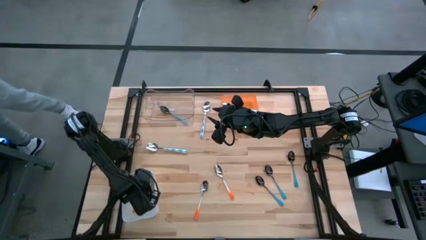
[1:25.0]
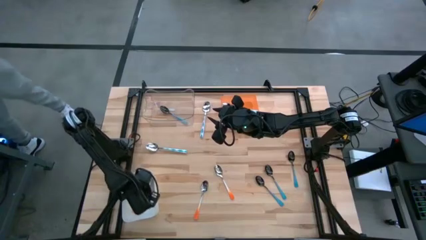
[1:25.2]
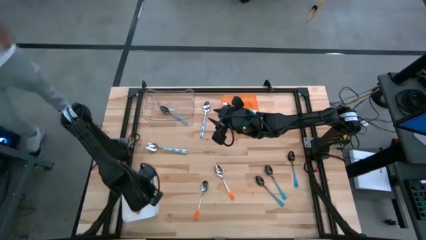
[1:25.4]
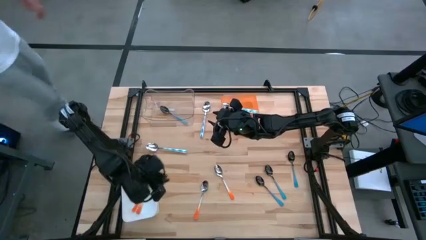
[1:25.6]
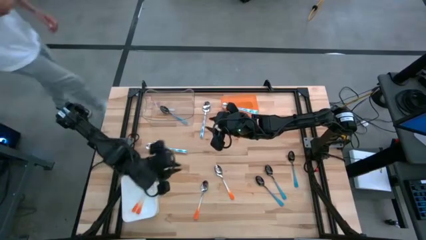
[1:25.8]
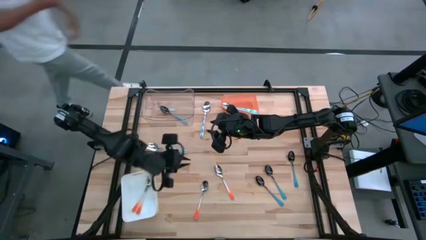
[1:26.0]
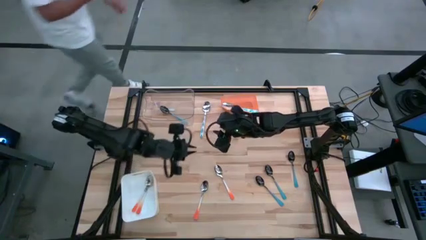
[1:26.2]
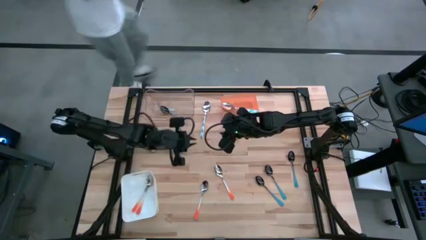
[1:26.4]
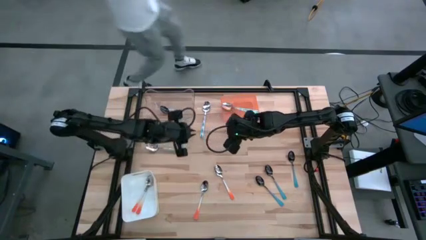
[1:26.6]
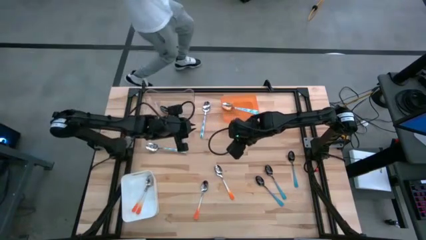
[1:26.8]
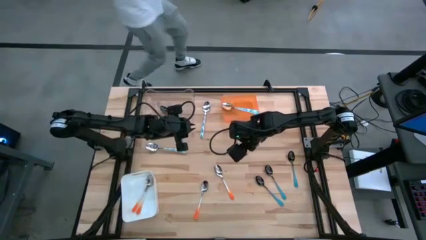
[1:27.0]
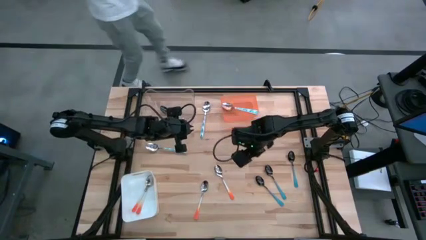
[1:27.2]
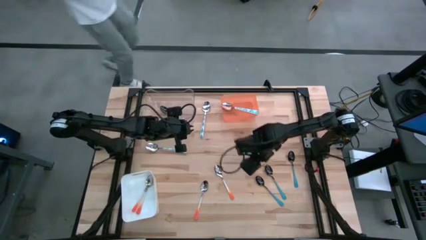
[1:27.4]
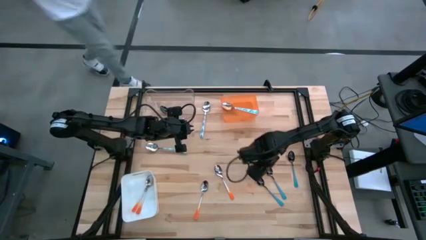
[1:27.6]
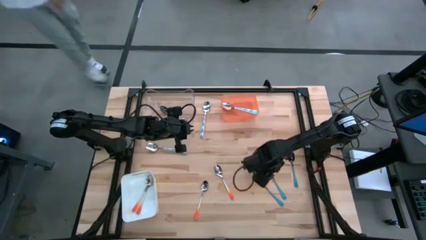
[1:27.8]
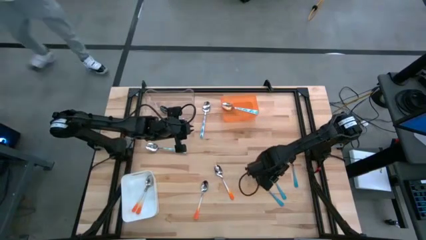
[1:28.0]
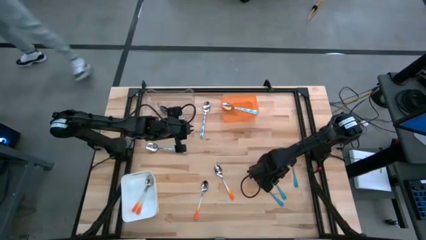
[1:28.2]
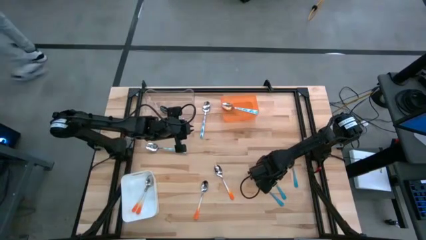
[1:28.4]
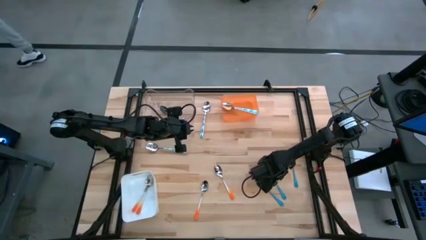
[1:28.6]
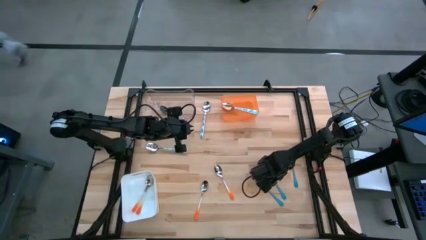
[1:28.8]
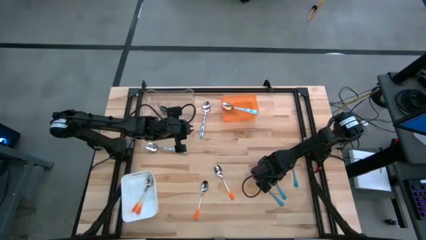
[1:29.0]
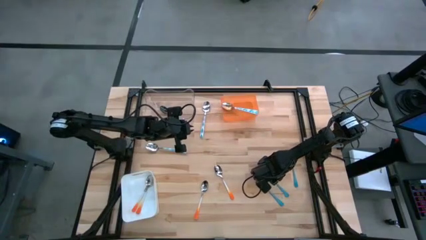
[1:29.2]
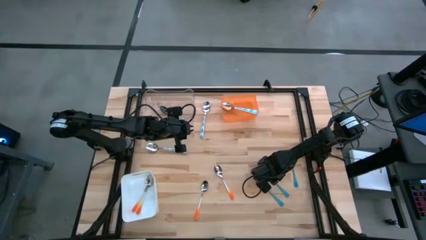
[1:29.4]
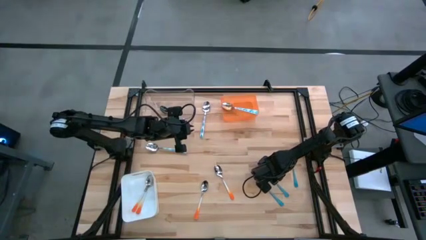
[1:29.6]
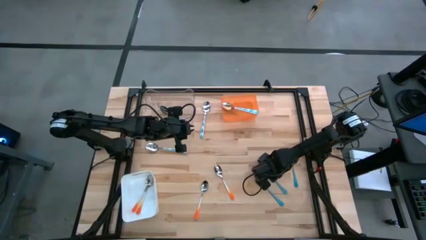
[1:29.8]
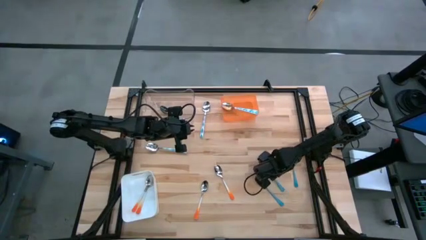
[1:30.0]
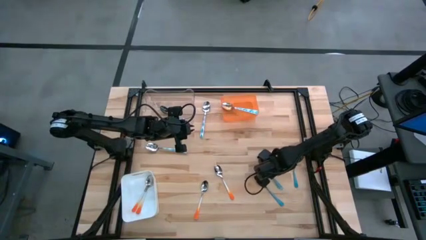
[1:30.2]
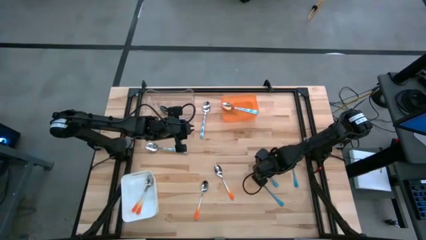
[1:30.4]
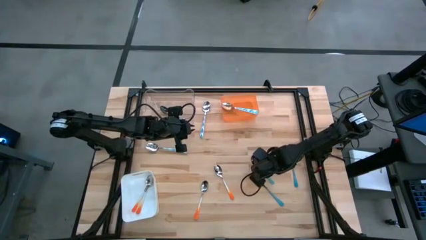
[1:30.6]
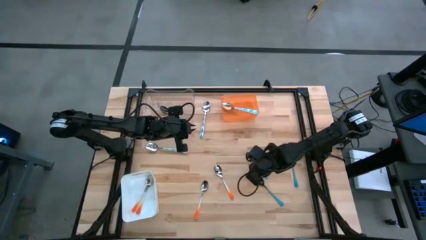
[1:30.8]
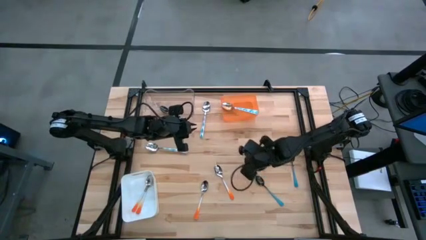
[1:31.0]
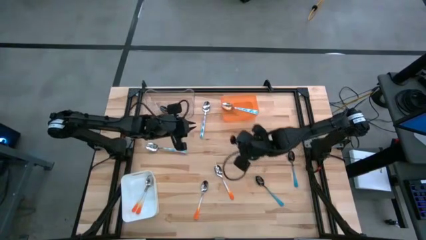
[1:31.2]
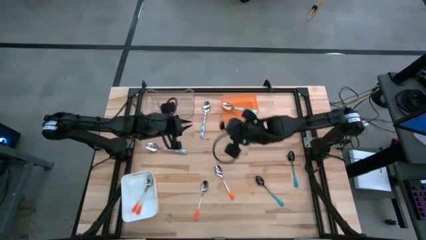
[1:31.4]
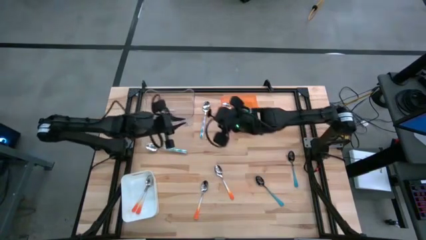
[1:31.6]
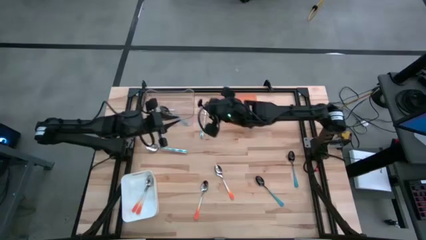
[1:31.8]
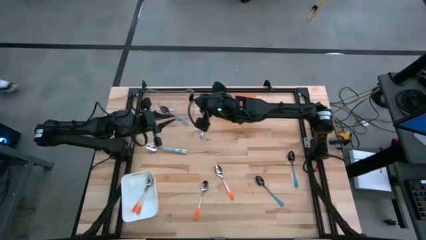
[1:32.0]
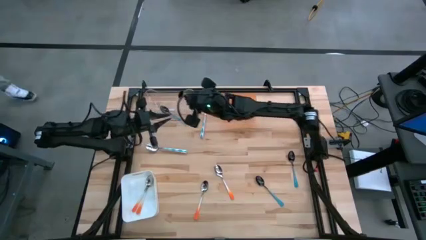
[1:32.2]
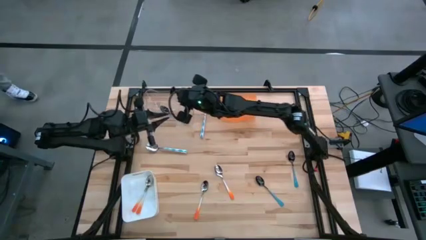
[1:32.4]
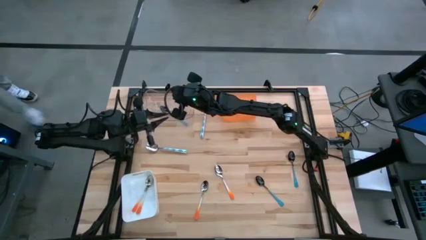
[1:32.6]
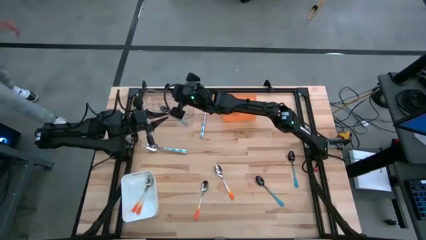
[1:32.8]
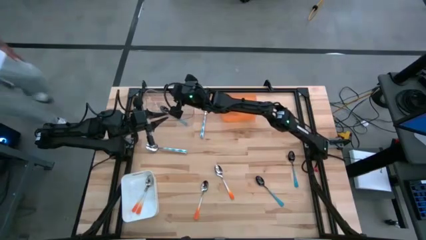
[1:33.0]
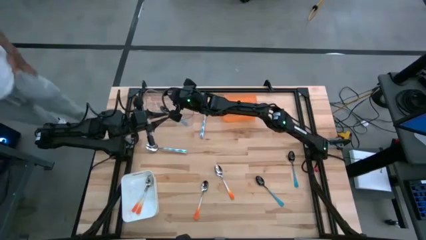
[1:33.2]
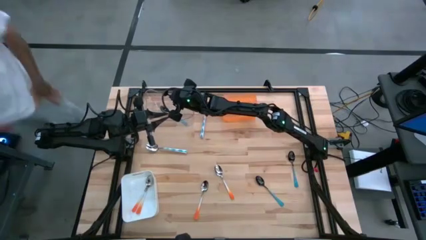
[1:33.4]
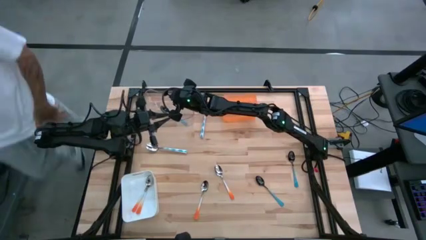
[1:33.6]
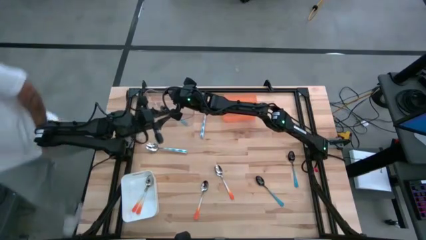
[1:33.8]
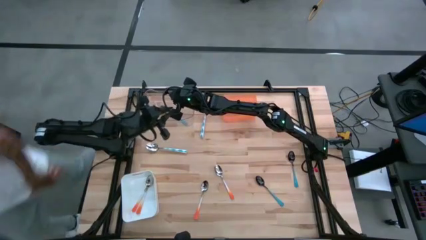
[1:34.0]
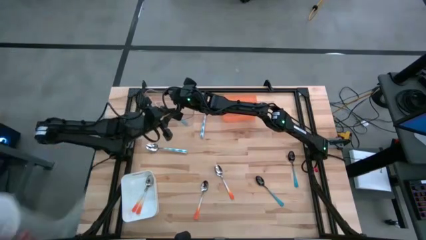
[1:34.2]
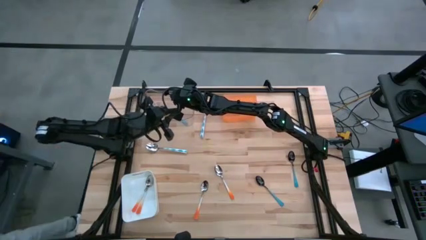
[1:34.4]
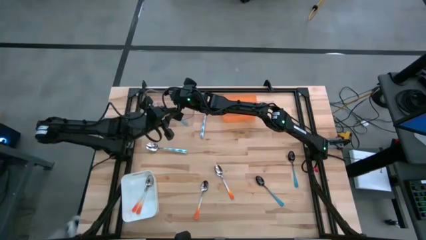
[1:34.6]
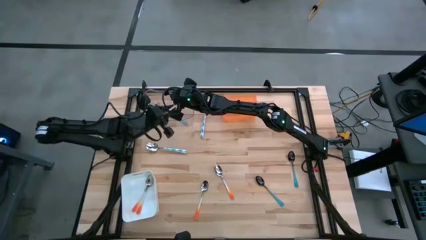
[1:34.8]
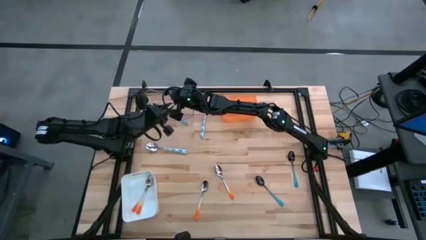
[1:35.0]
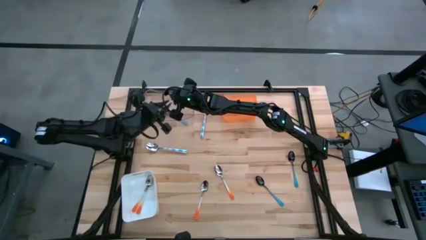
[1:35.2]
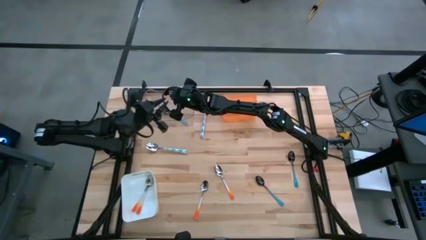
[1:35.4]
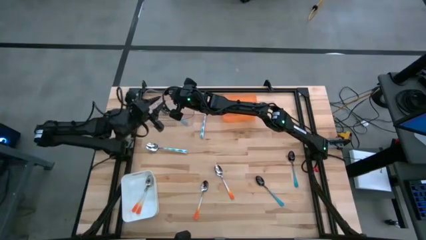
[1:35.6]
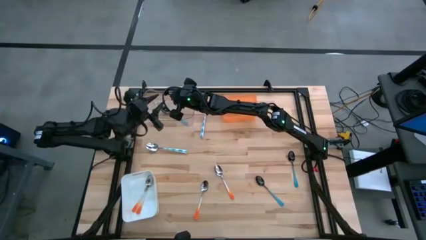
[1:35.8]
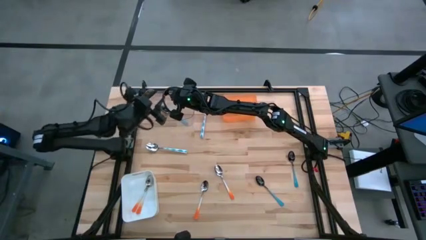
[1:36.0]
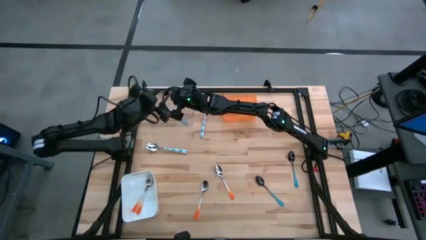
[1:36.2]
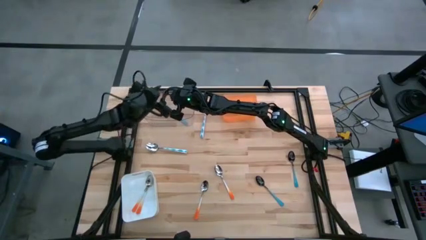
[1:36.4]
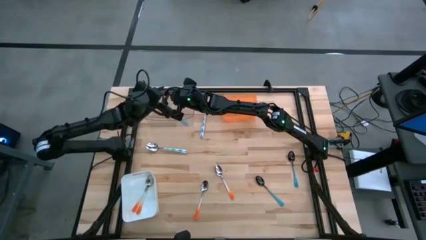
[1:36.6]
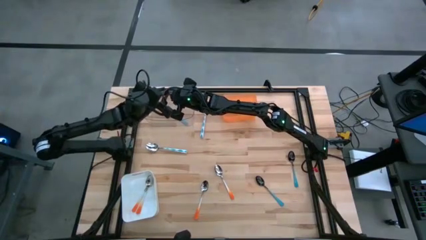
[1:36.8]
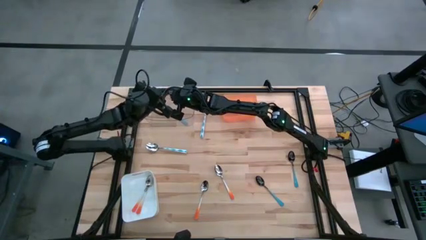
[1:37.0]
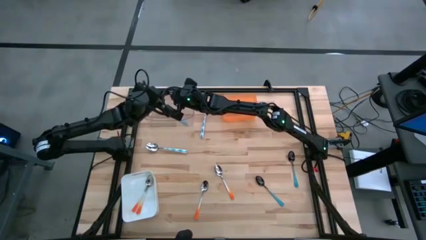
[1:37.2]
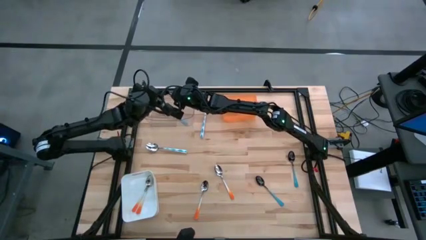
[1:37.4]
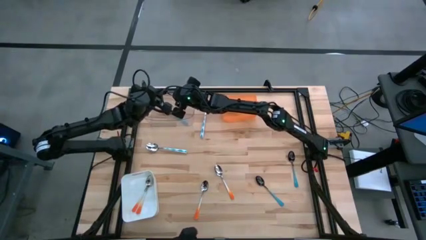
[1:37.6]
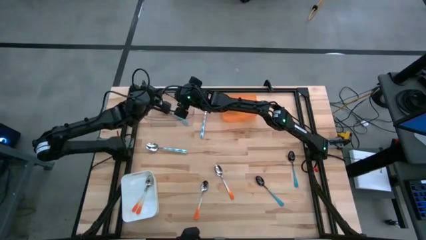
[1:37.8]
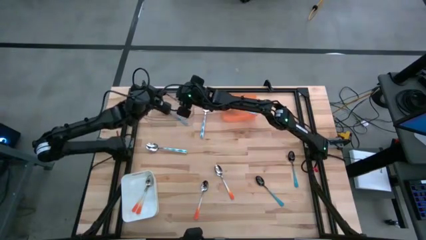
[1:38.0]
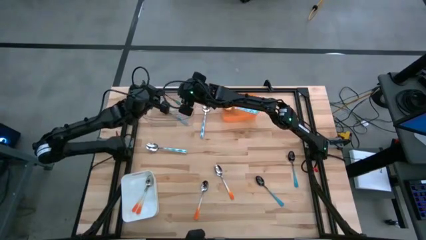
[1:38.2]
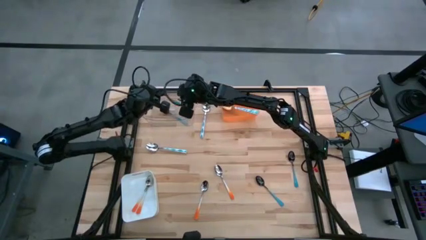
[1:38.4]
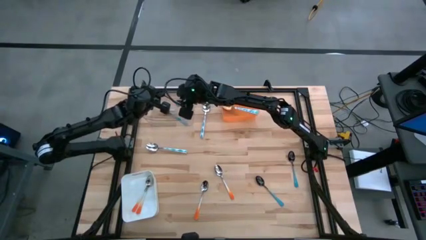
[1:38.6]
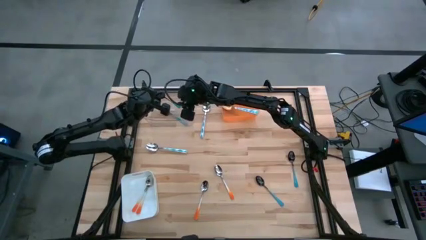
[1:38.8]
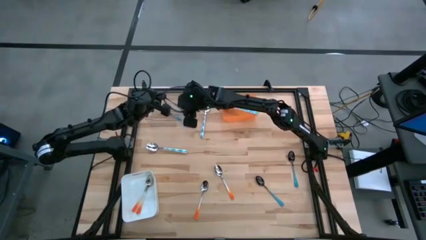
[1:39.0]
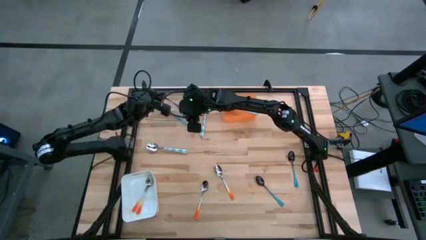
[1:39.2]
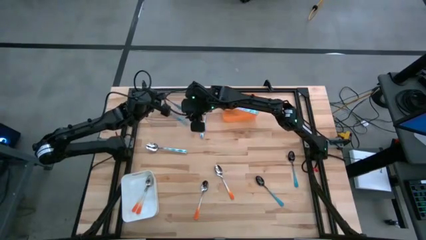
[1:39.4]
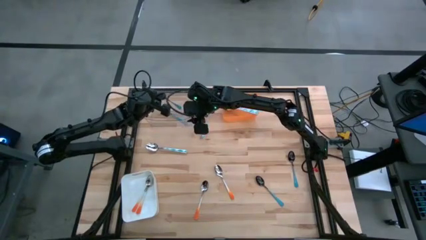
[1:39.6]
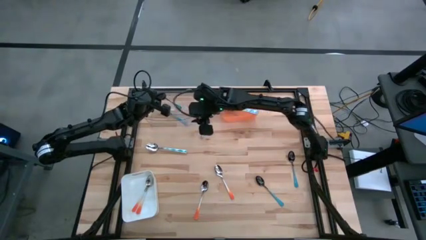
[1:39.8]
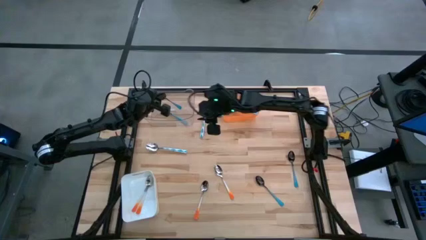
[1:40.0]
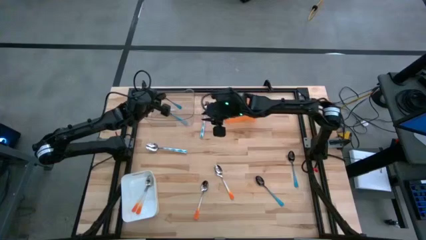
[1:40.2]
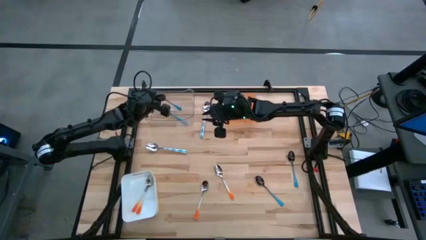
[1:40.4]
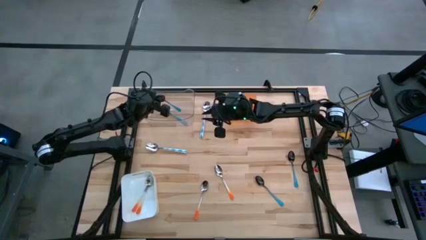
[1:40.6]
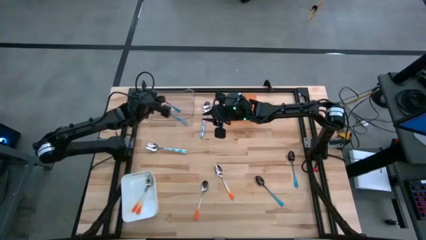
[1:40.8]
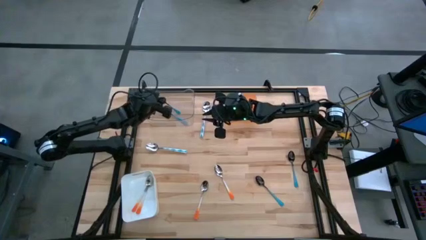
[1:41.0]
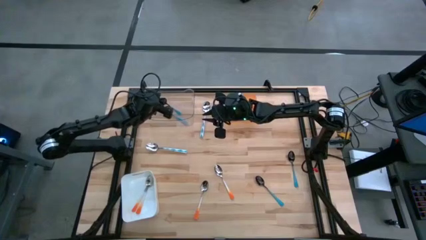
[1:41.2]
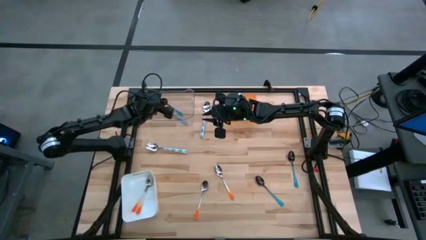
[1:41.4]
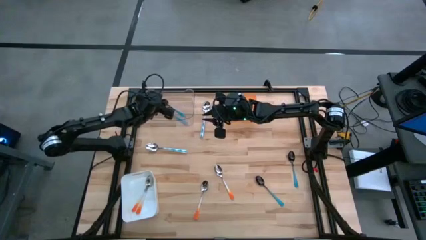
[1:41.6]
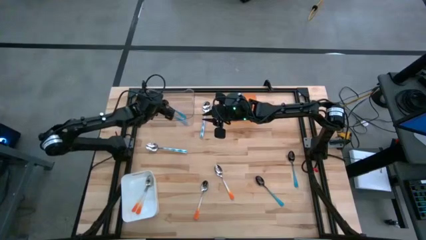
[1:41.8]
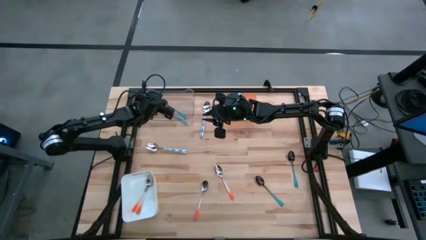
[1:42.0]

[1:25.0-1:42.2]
Task: Sort silverware by color (type)
Put the blue spoon into the transparent bin
